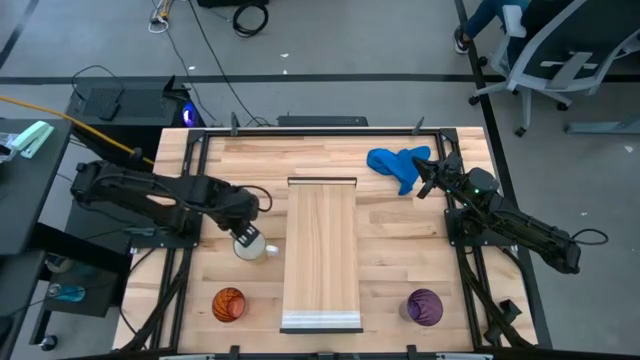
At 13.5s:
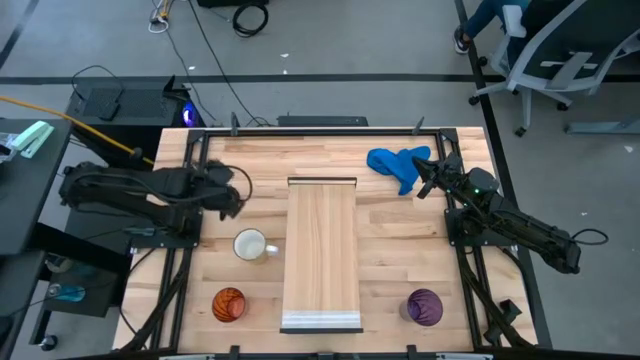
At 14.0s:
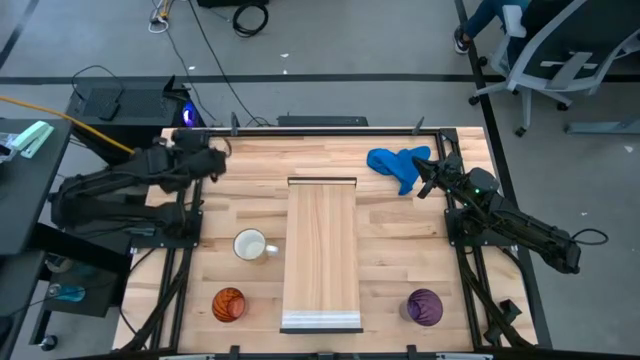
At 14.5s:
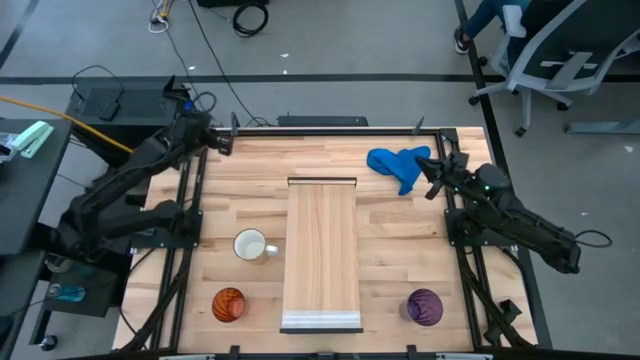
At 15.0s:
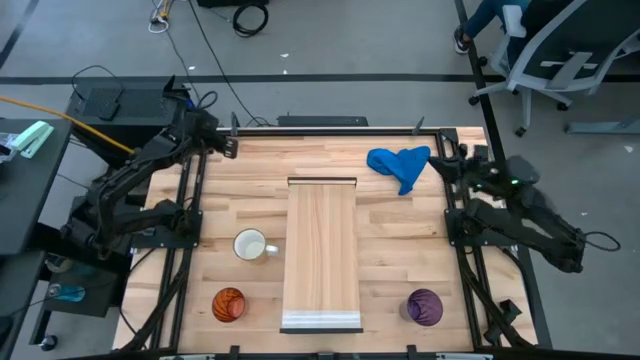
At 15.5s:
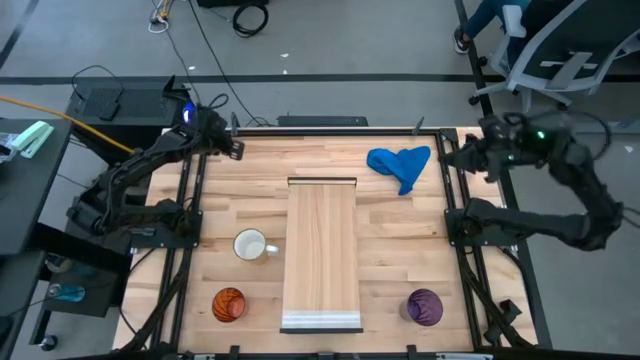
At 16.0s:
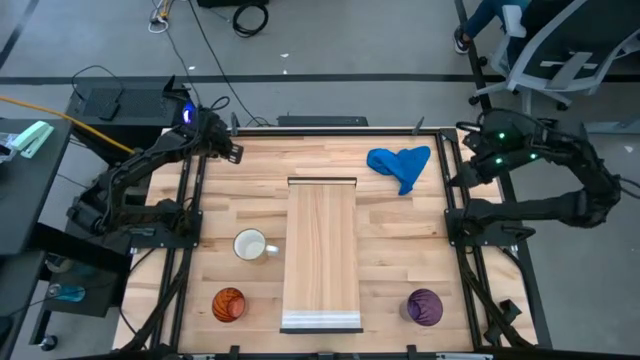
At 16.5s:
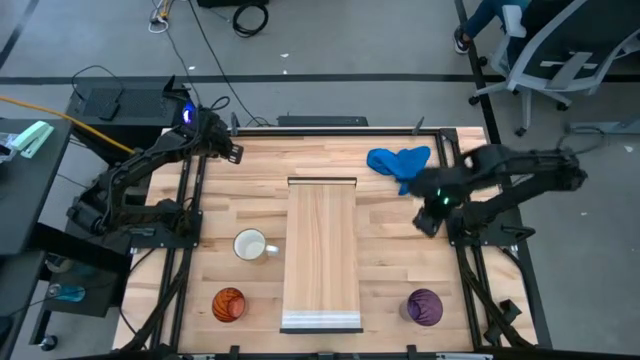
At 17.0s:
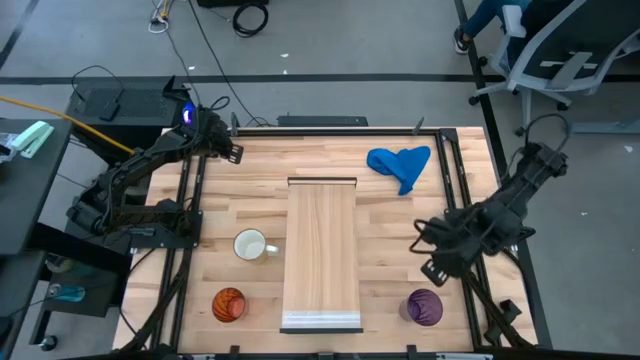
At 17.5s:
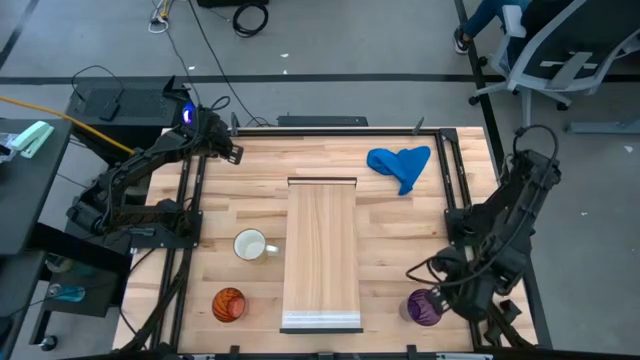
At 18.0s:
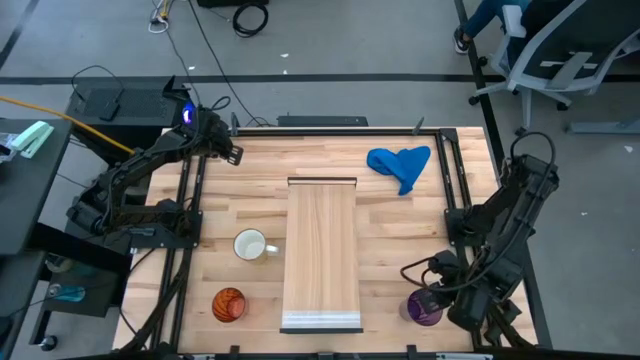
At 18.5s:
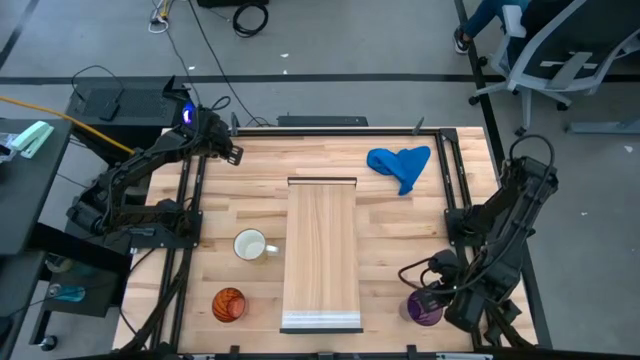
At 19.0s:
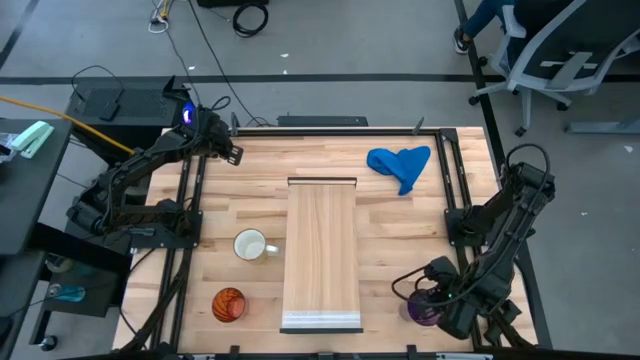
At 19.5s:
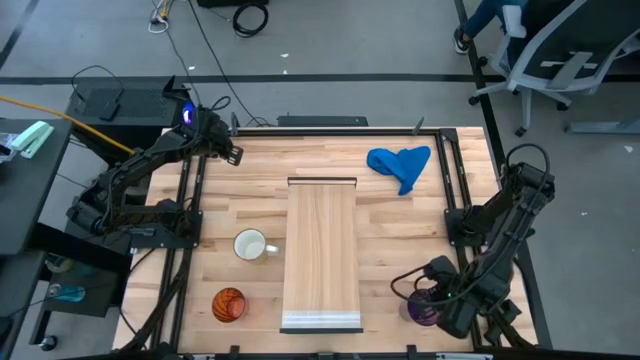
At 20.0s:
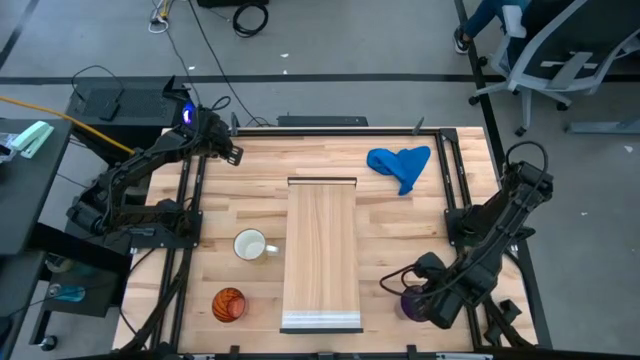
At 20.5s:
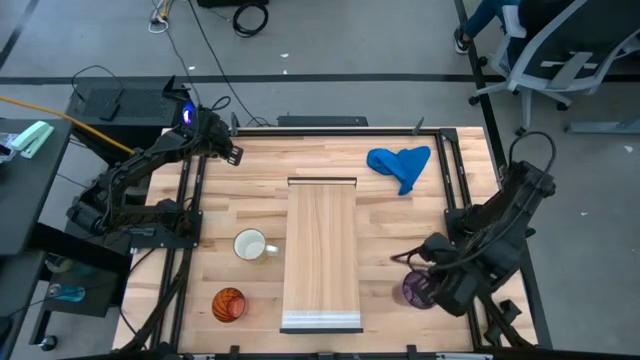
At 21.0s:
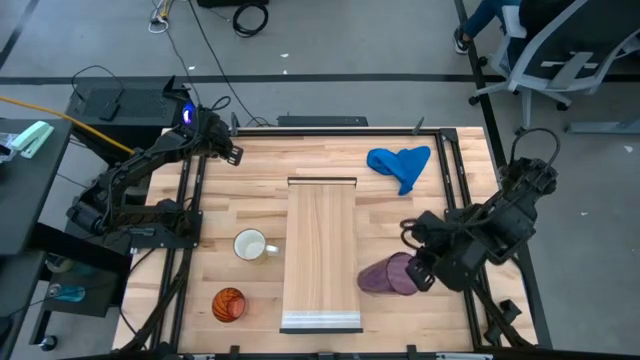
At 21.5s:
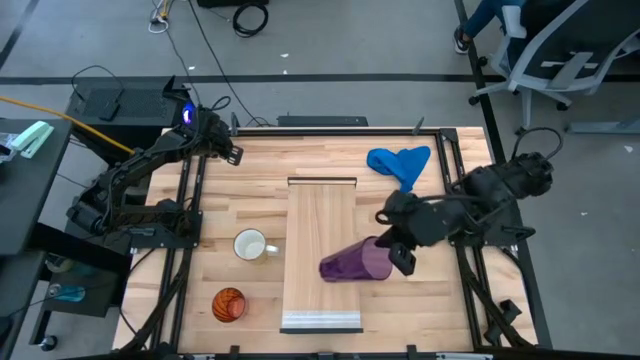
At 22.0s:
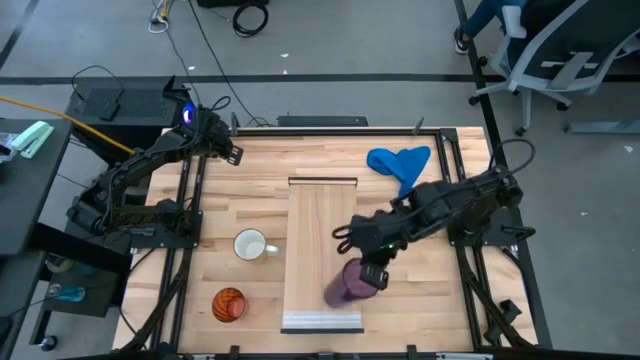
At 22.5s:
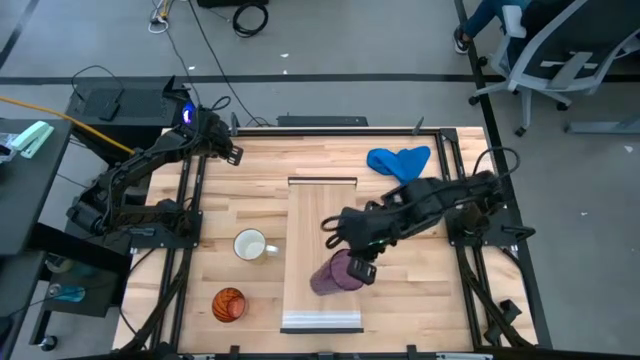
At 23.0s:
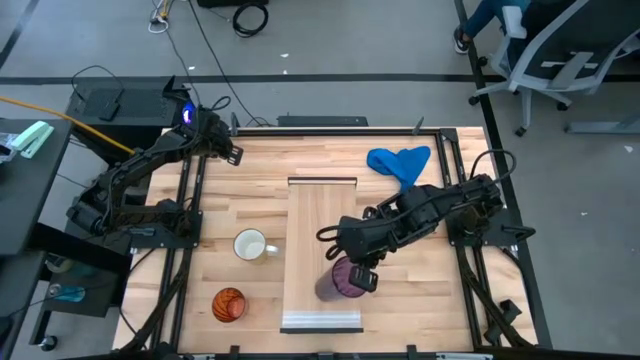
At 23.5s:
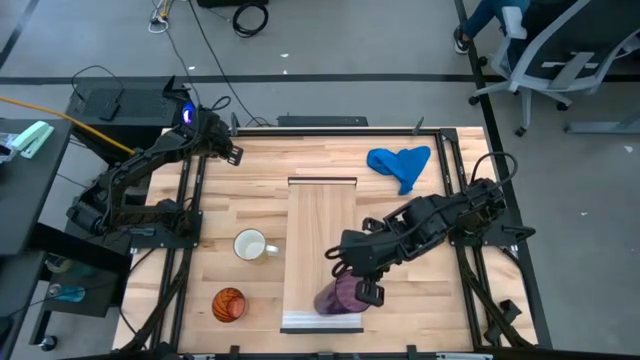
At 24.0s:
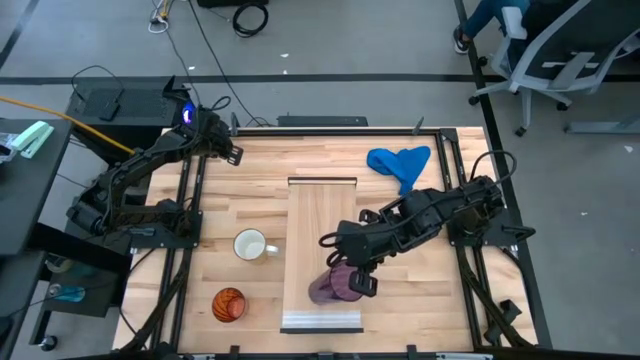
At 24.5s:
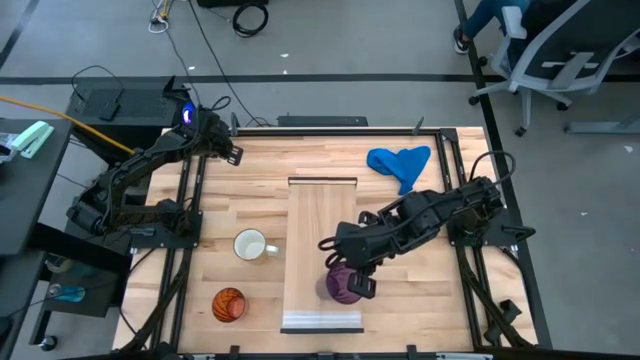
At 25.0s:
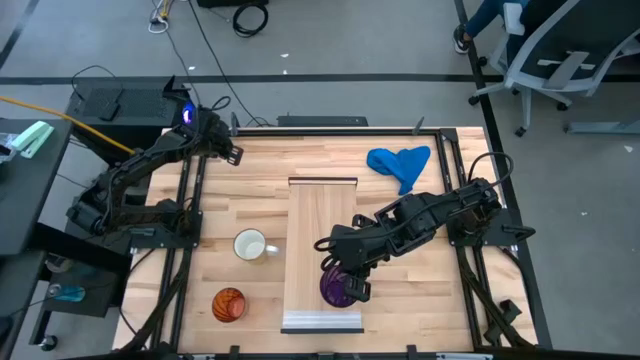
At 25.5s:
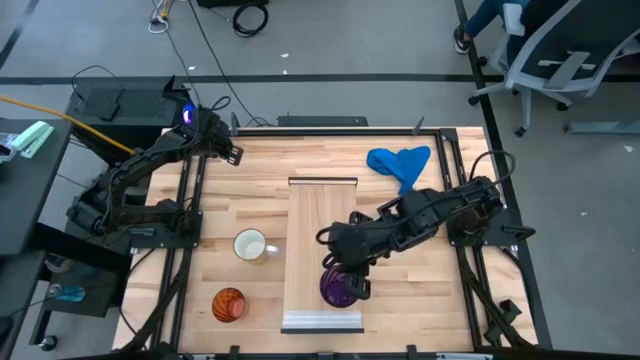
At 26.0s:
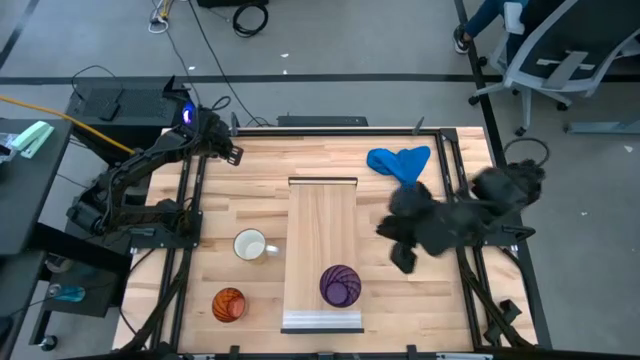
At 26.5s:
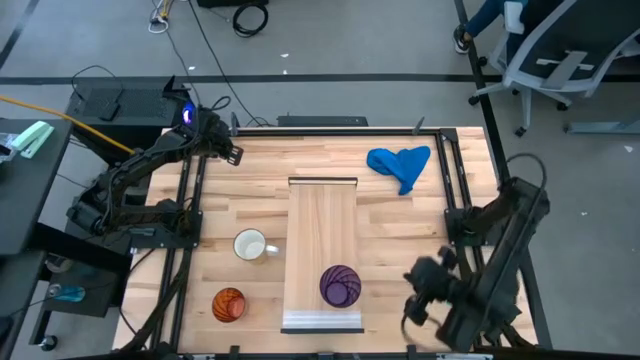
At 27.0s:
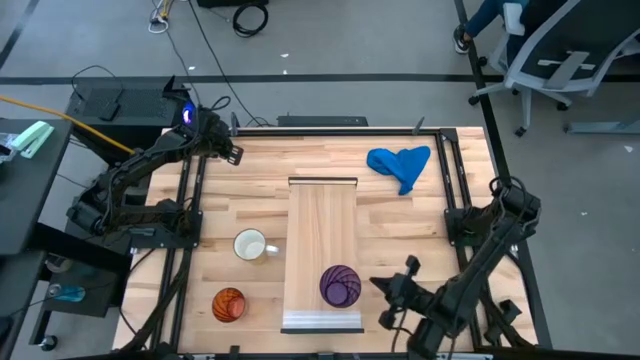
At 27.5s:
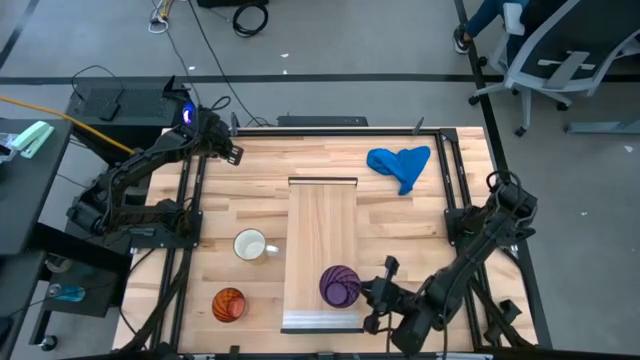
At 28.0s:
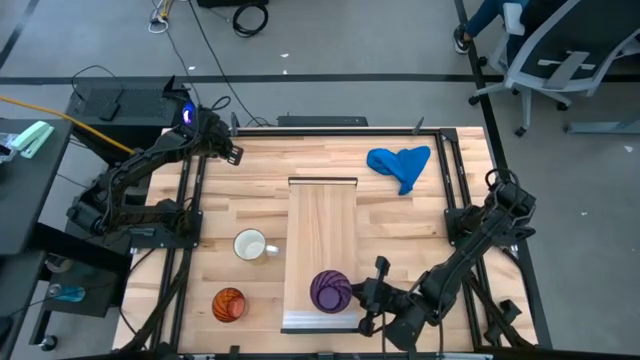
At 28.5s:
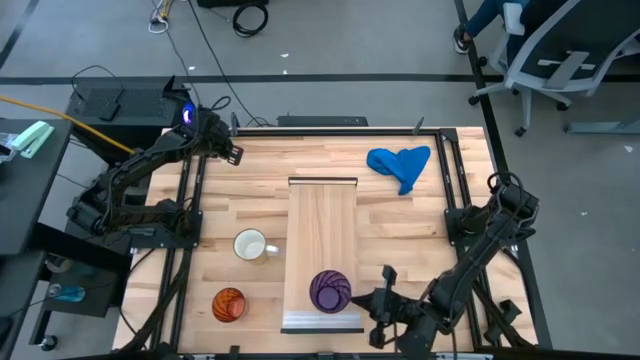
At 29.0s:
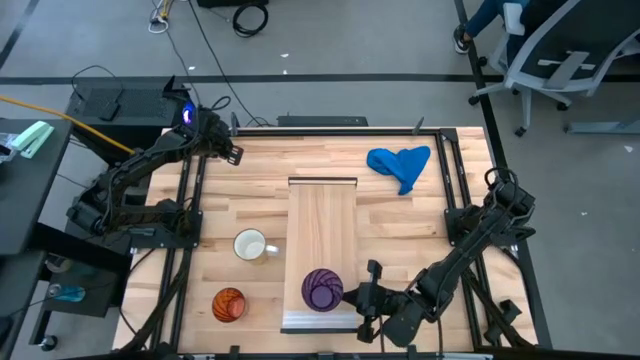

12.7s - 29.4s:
Task: Stack small to large cups/mugs on shelf
Put the purple cup on the shelf

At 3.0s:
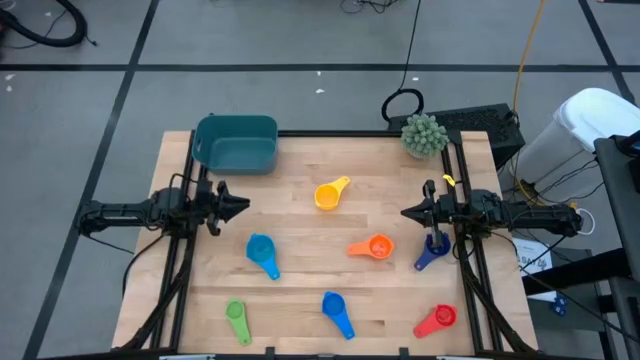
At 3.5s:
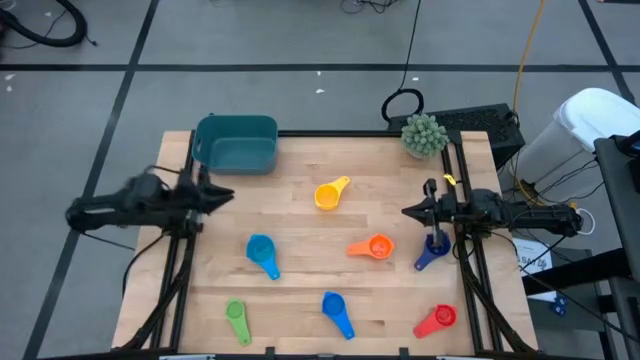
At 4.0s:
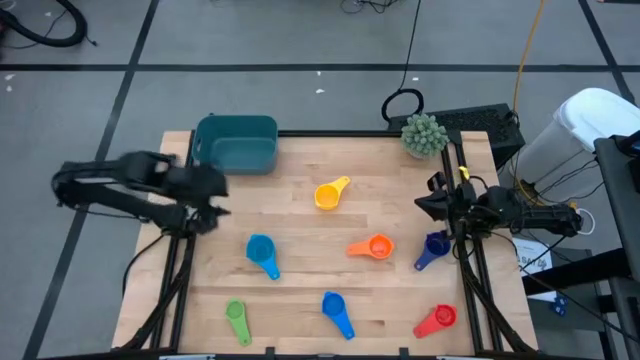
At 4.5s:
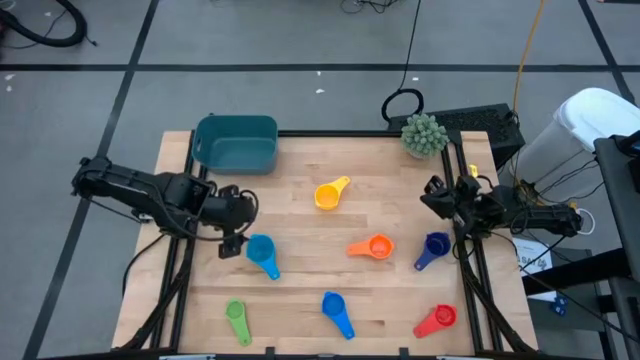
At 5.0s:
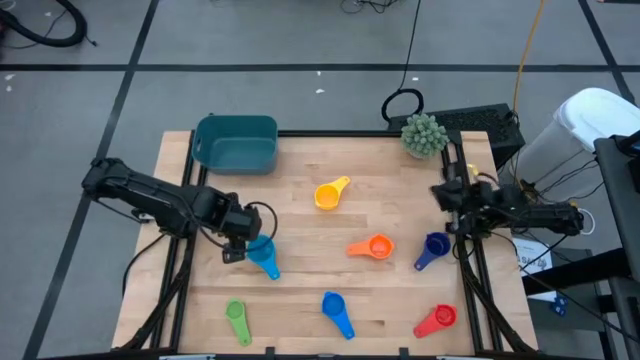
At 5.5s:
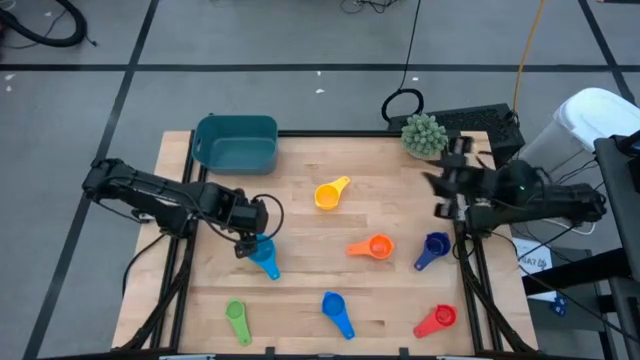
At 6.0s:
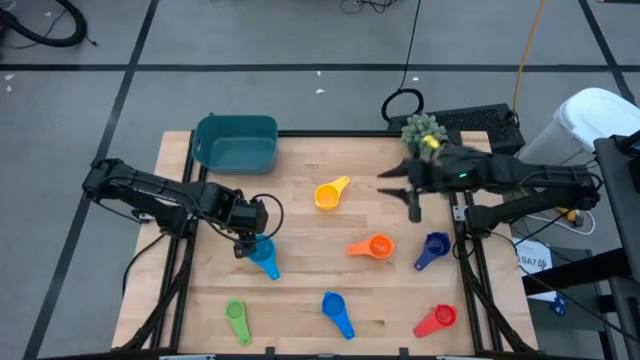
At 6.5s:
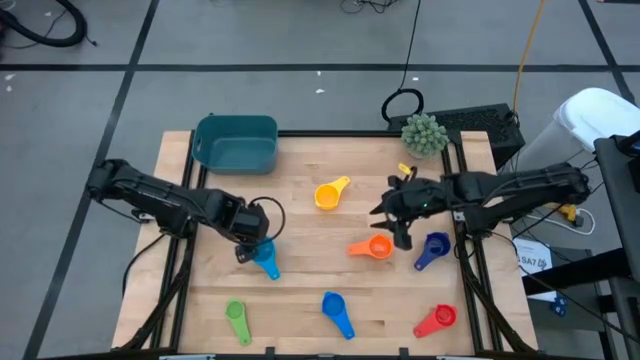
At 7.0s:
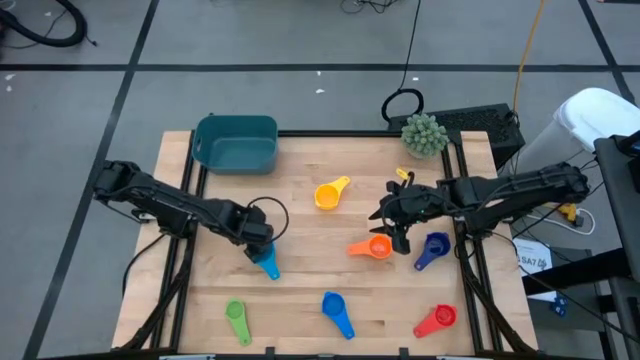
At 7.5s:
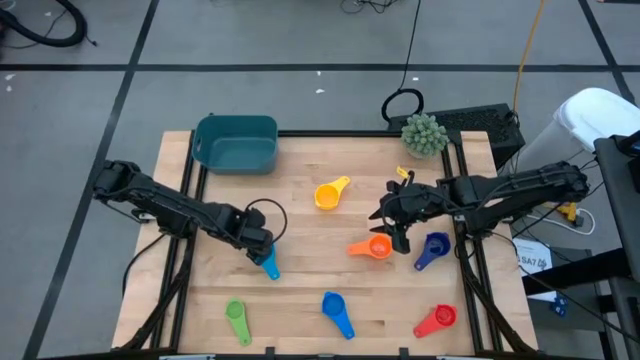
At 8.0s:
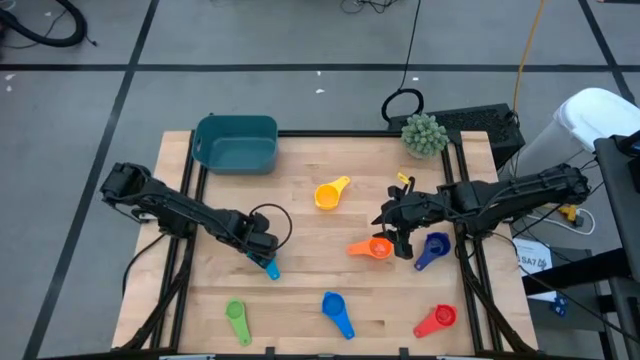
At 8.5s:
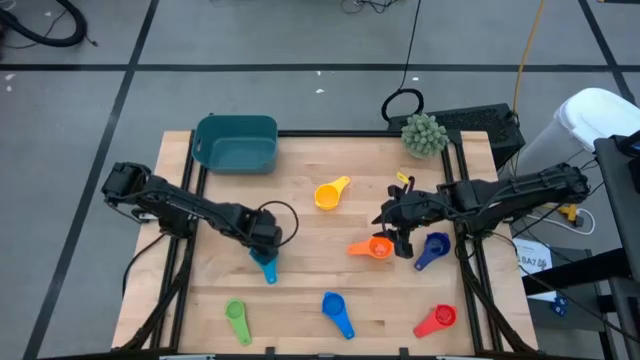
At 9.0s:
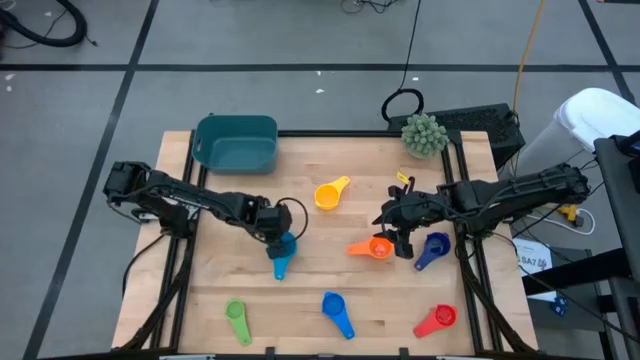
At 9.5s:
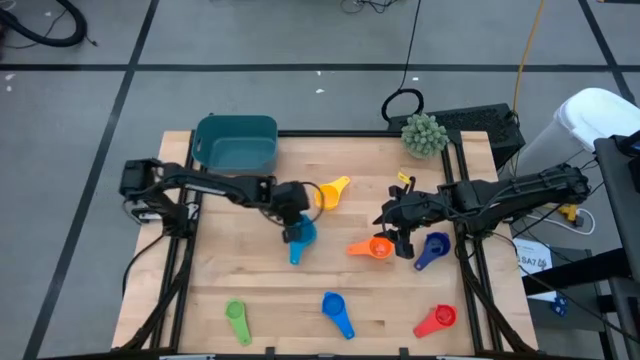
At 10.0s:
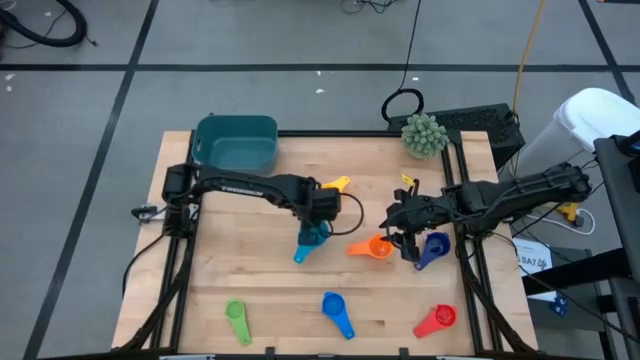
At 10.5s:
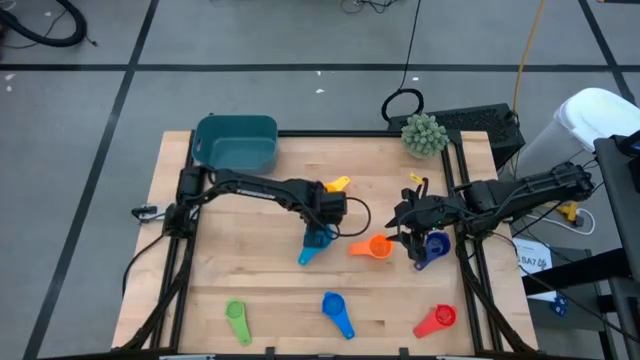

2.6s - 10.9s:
Task: Nest measuring cups in basket
Move the light blue measuring cup to the center of the table
